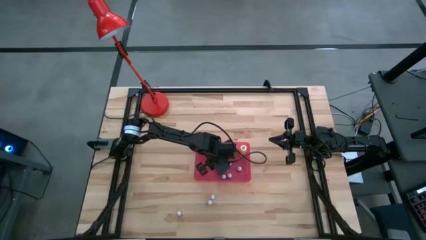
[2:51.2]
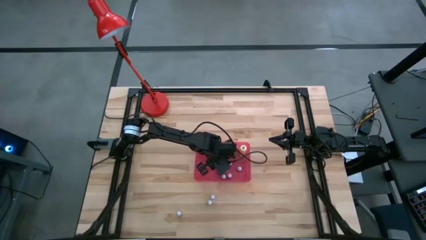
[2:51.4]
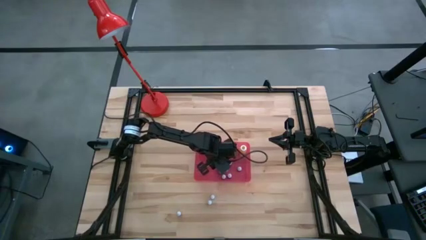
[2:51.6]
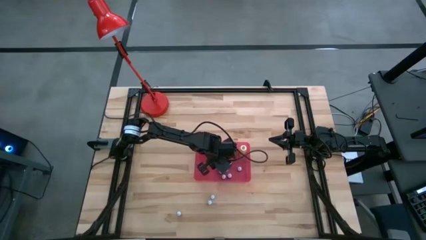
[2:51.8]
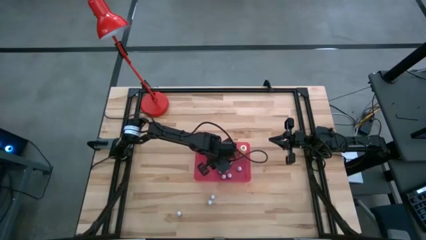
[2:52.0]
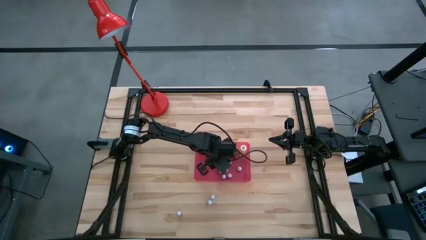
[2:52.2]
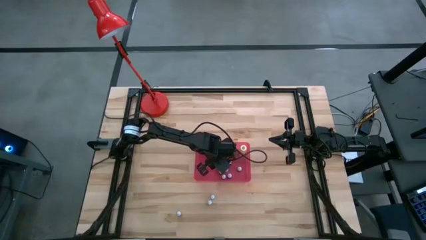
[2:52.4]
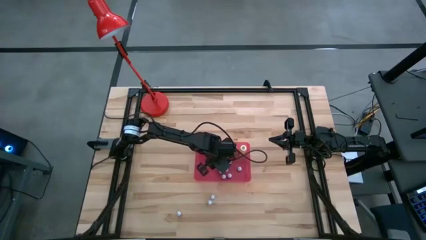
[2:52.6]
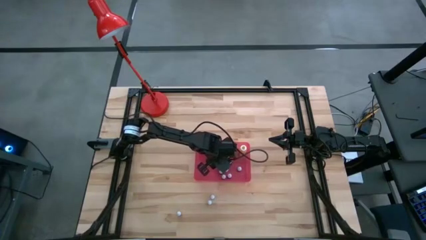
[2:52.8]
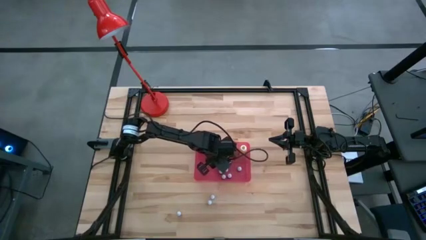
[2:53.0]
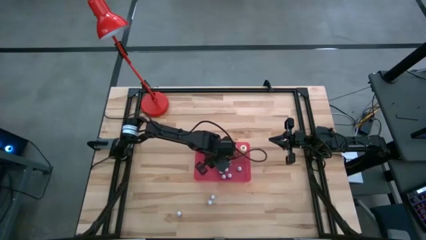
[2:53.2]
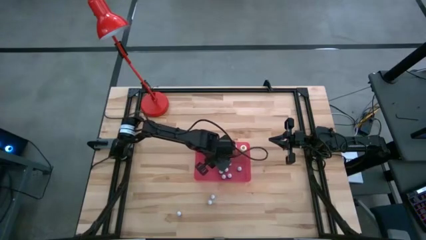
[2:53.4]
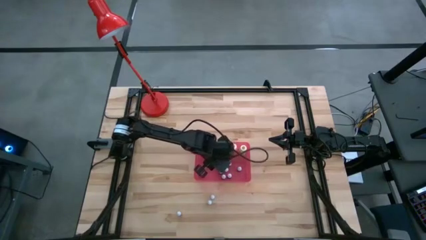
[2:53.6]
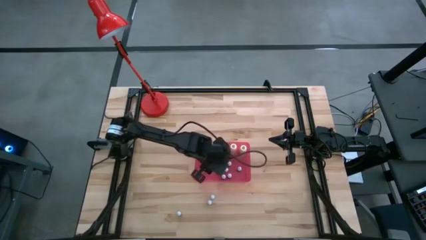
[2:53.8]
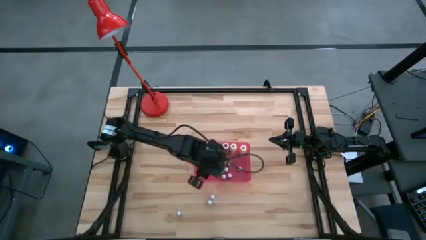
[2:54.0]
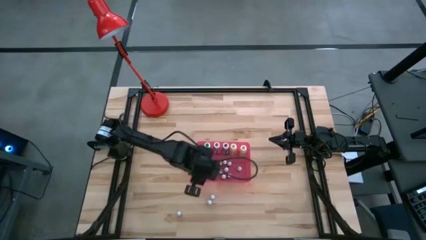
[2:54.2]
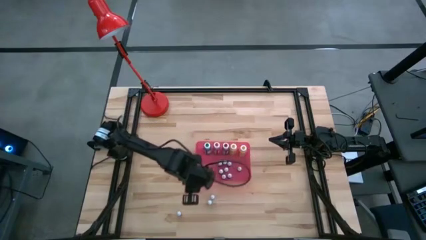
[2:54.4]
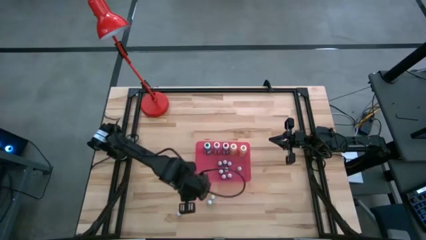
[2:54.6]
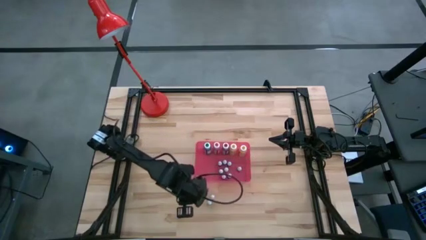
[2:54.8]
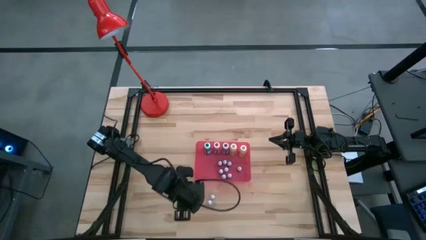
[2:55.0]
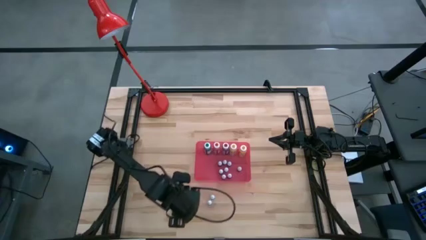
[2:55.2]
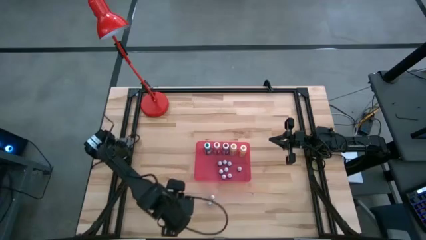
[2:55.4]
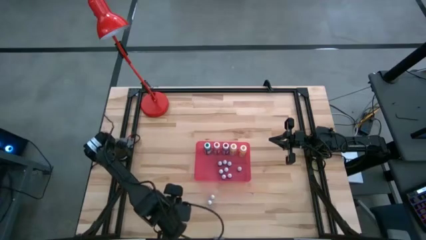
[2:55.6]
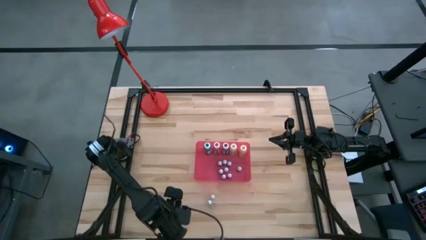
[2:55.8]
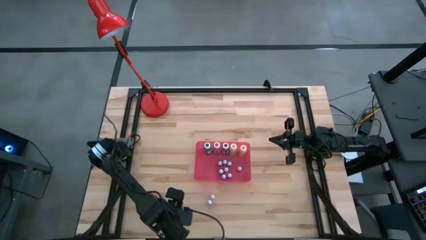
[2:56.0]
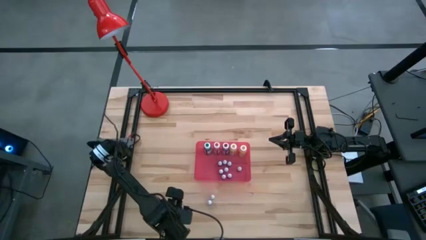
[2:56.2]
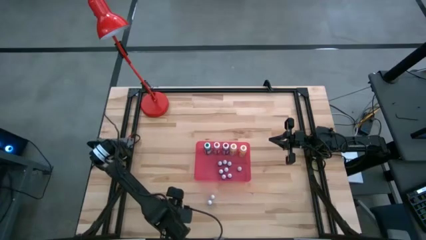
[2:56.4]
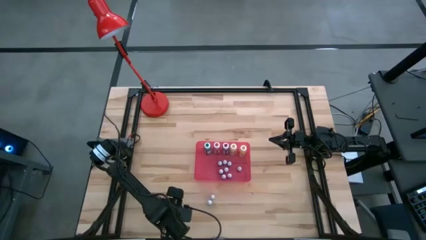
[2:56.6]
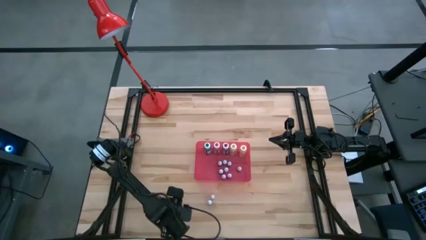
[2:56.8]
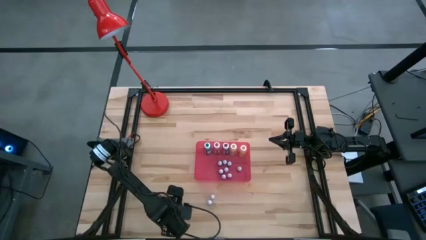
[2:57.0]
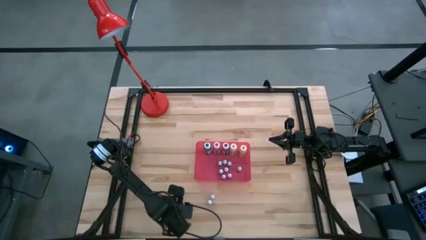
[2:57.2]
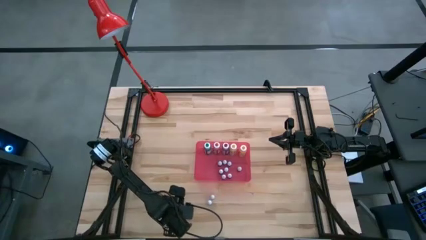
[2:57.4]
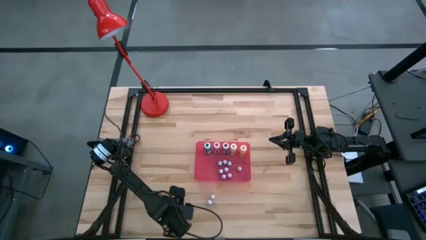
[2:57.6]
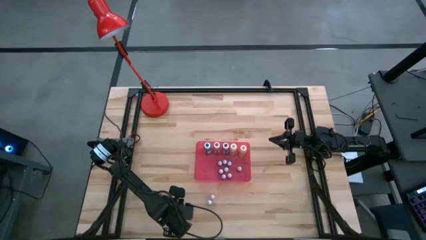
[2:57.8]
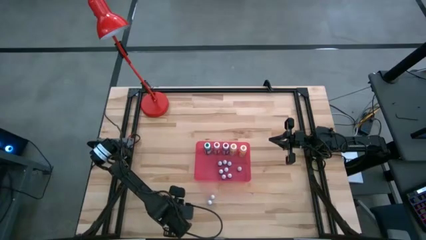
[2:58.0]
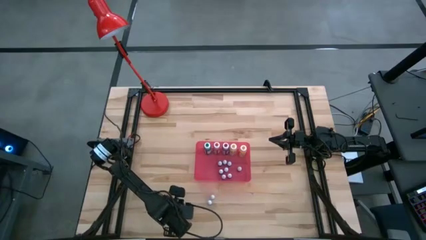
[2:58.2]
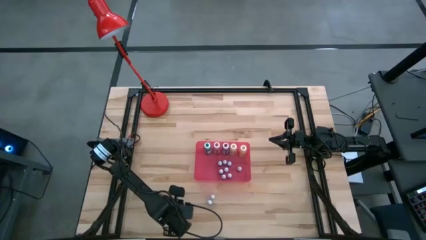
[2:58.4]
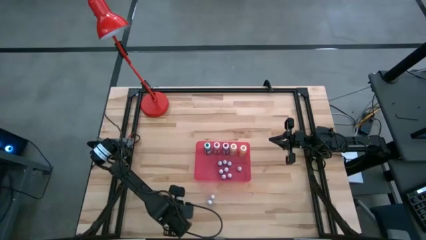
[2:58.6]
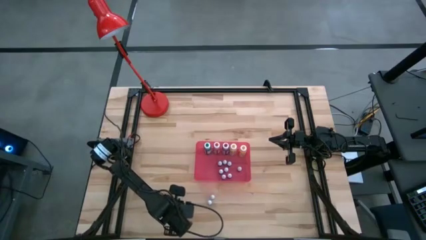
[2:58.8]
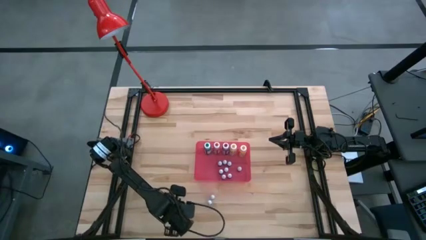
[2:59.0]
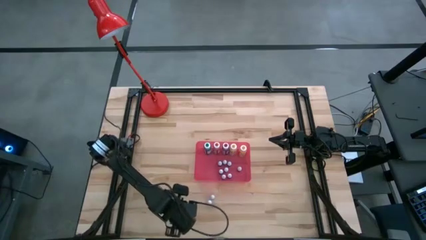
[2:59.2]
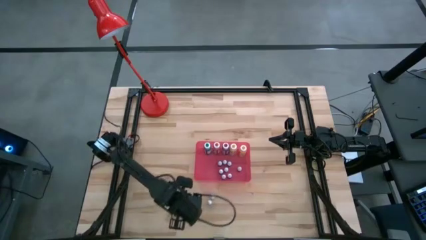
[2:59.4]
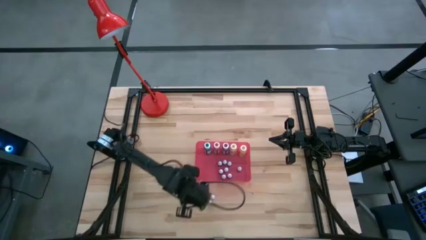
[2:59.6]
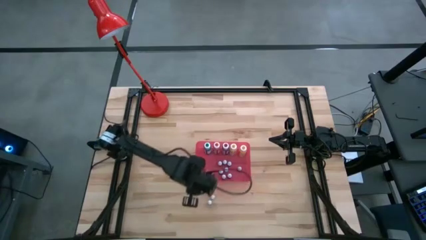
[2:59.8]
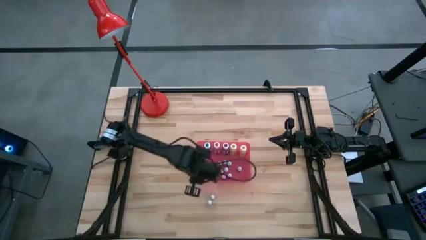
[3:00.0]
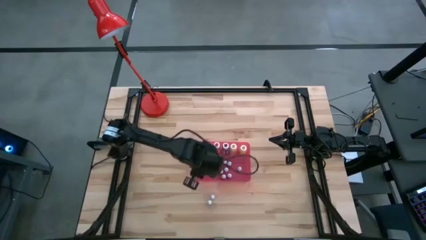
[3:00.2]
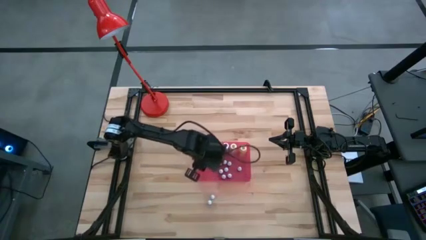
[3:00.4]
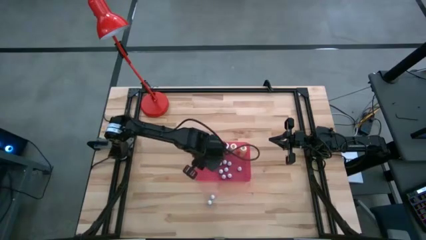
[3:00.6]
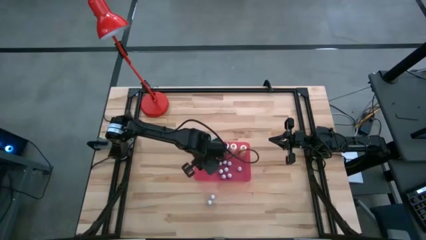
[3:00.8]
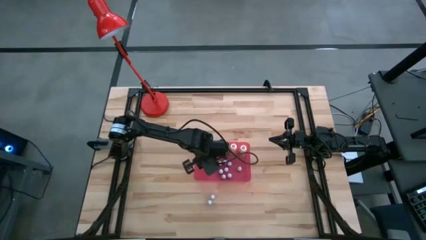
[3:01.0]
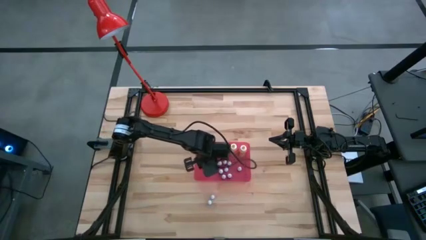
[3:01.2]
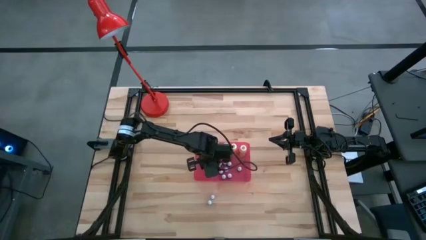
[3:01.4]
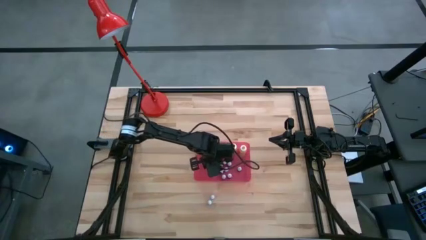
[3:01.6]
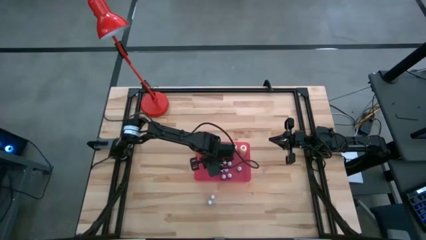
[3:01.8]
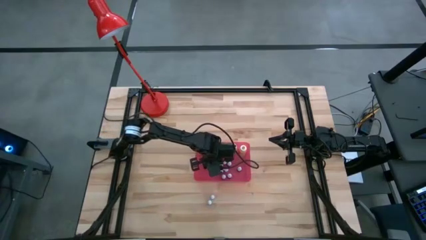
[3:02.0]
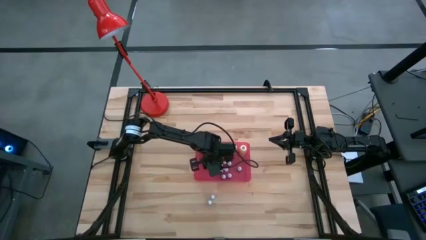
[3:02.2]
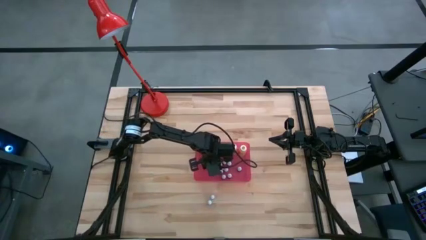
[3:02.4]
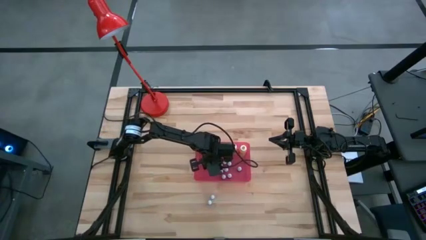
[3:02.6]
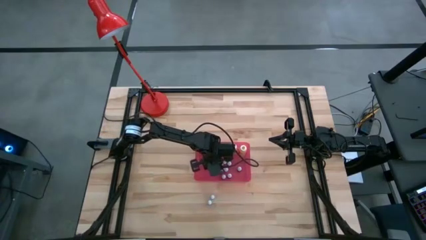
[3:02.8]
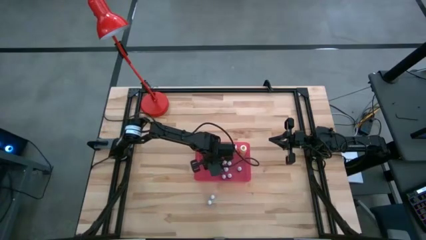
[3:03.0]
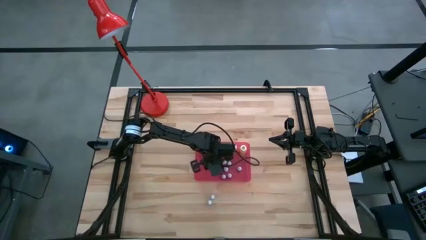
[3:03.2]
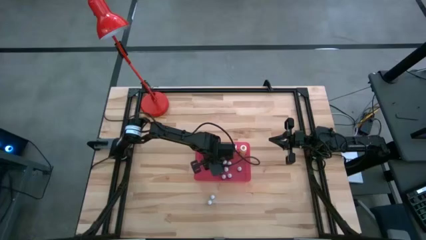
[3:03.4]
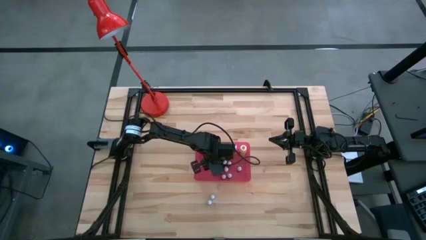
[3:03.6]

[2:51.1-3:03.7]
Task: Pick & Place food coloring
Put the small red food coloring bottle into the container

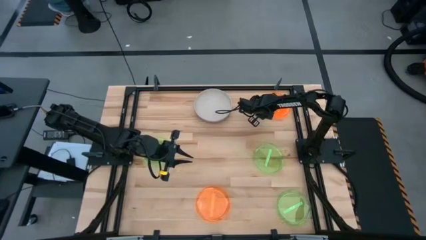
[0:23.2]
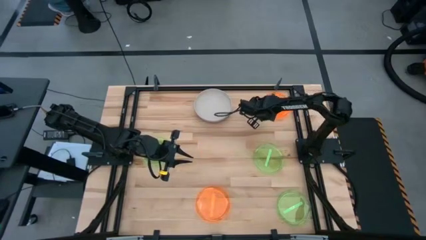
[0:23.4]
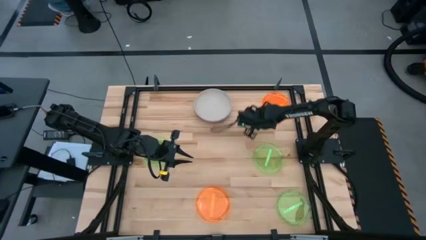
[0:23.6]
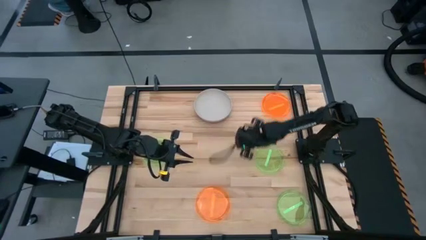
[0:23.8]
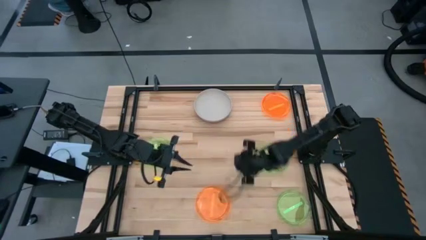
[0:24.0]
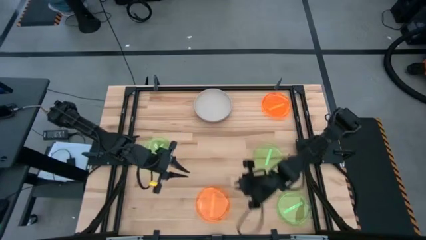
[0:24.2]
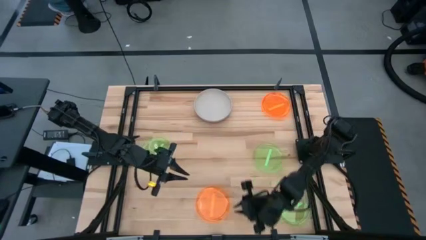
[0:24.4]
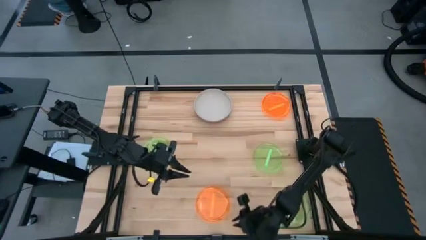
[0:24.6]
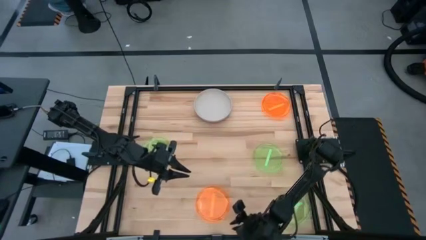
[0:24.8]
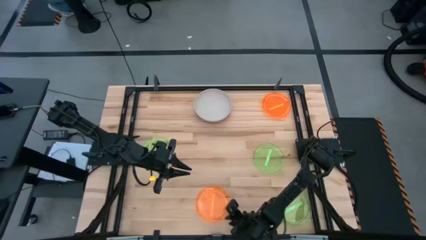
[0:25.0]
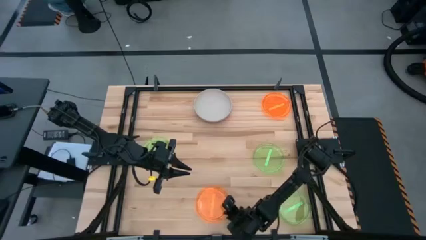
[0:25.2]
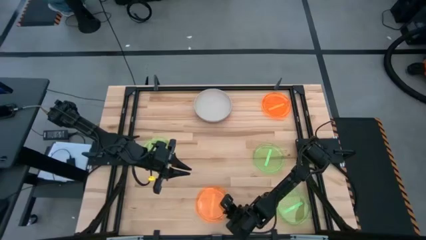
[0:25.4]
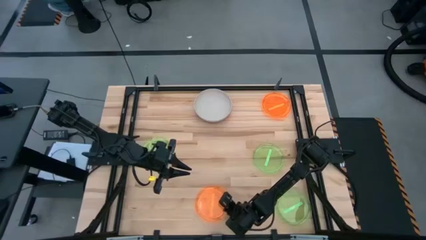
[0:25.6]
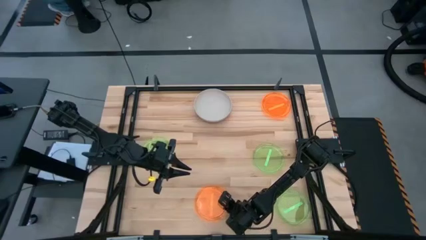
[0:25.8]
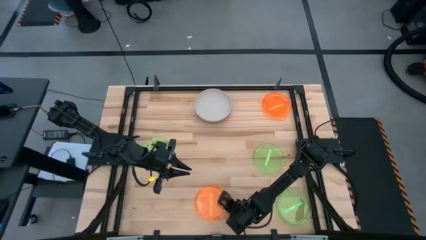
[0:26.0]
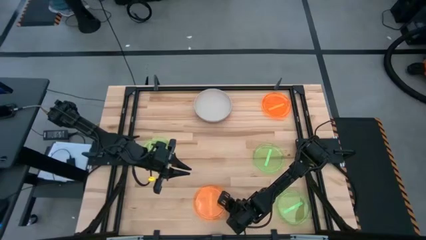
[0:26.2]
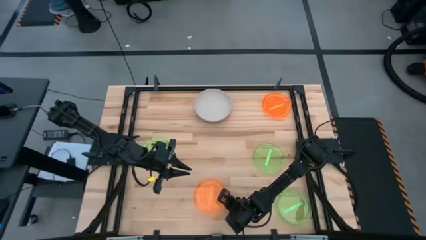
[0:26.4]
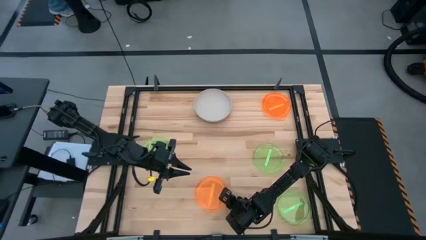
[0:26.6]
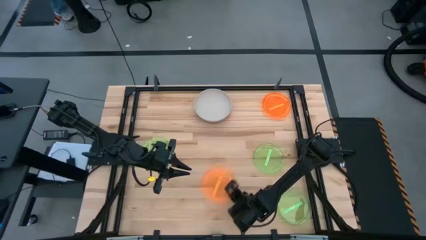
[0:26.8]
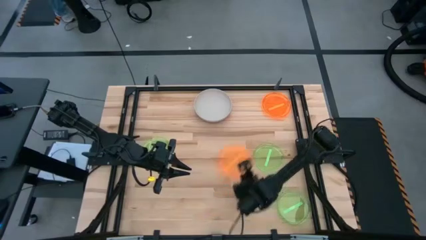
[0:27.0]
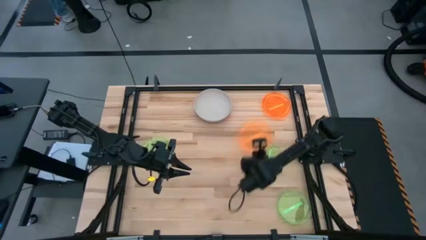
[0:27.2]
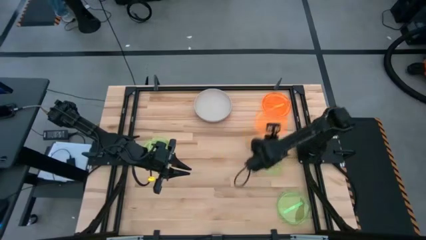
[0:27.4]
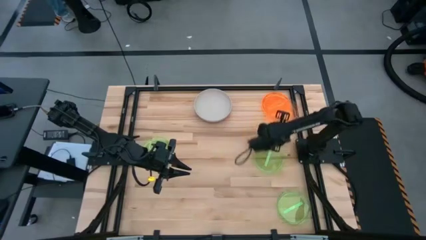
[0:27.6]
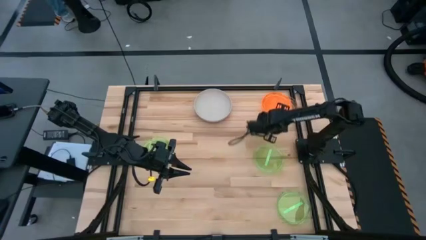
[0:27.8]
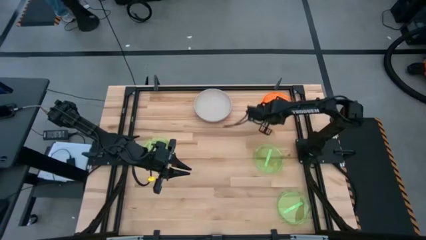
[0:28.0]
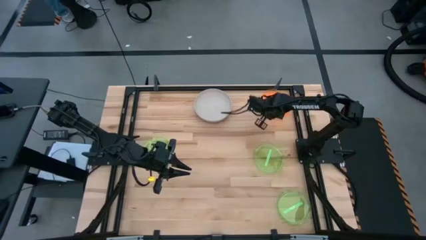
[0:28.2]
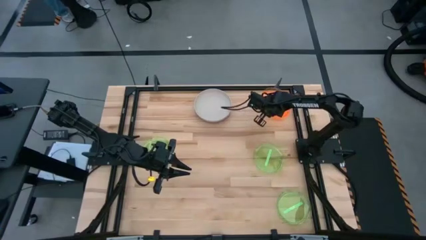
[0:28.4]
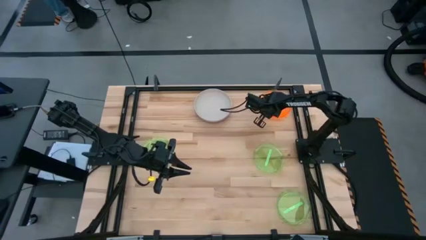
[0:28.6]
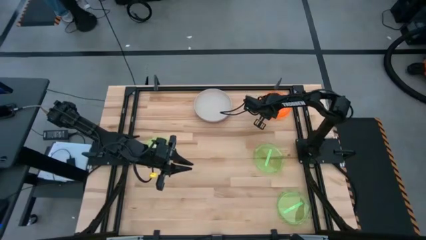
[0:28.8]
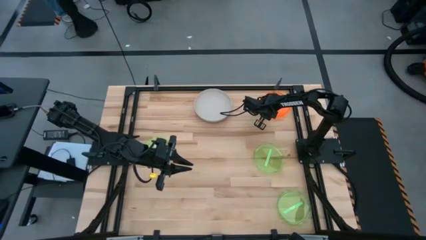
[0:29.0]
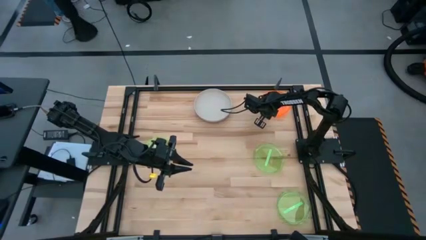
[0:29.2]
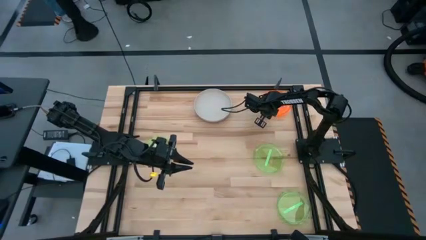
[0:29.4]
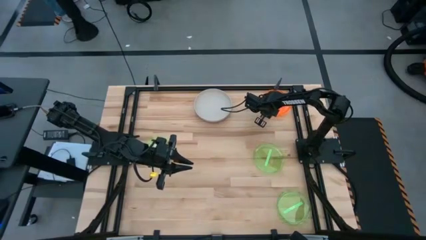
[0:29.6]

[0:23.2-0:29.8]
Task: Stack plastic plates
Stack the bottom orange plate on top of the top orange plate
